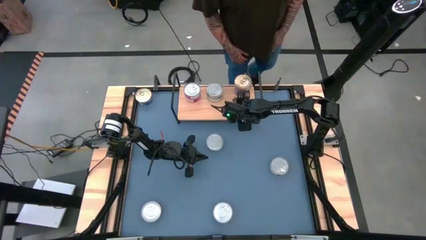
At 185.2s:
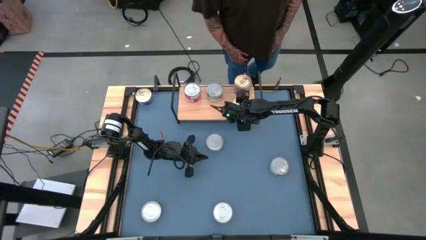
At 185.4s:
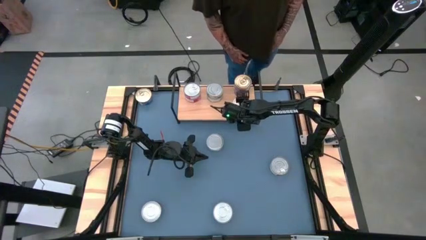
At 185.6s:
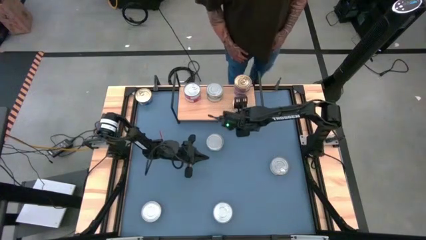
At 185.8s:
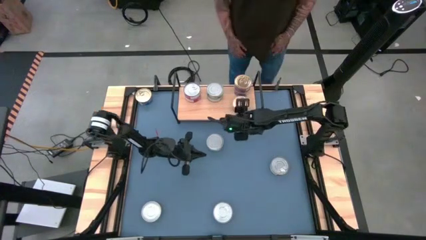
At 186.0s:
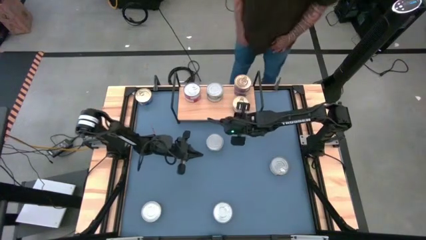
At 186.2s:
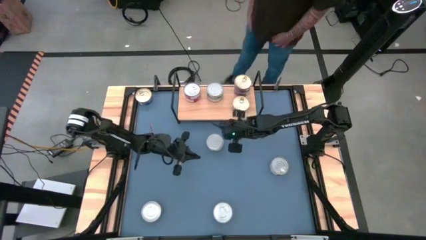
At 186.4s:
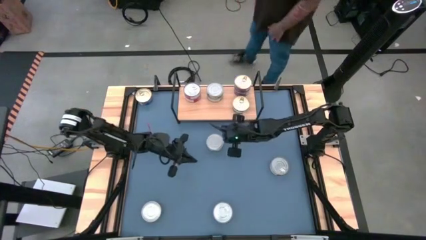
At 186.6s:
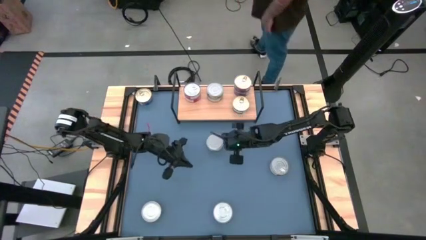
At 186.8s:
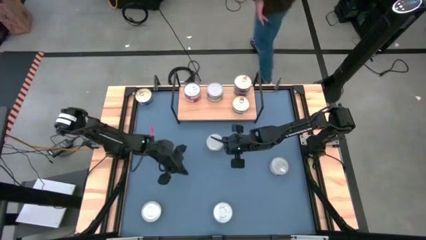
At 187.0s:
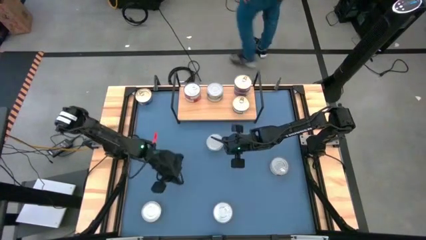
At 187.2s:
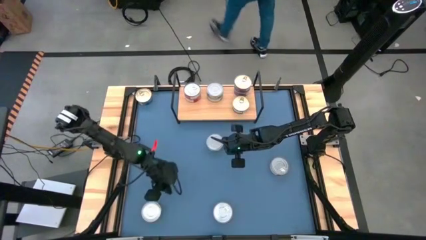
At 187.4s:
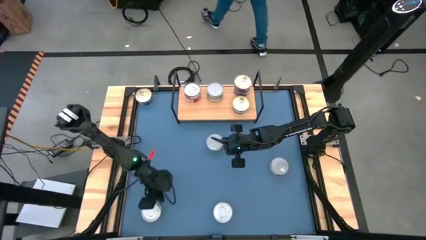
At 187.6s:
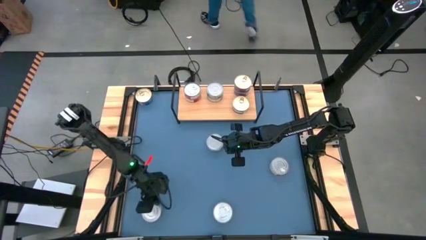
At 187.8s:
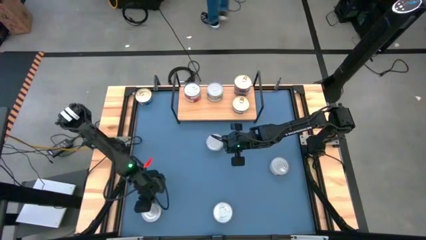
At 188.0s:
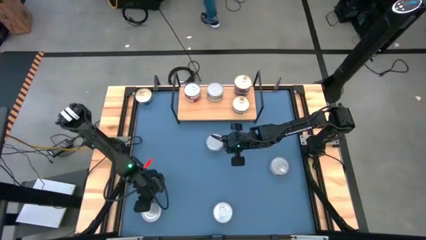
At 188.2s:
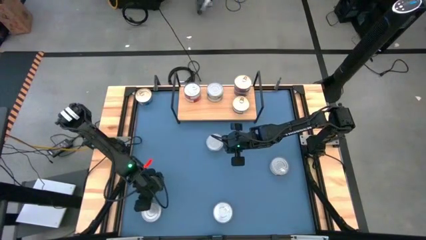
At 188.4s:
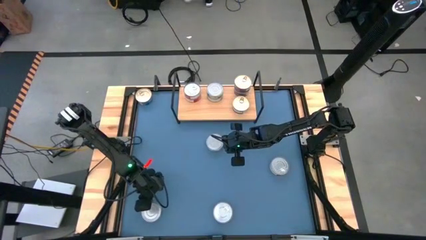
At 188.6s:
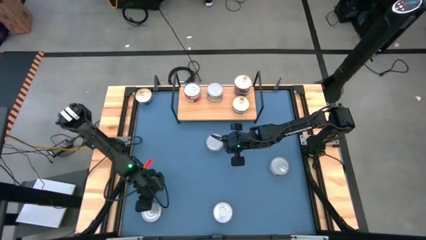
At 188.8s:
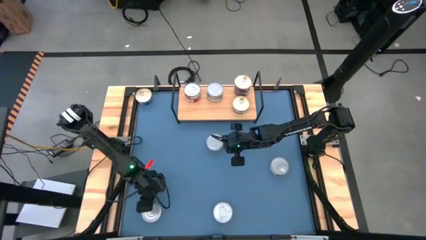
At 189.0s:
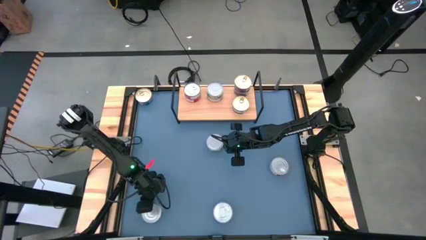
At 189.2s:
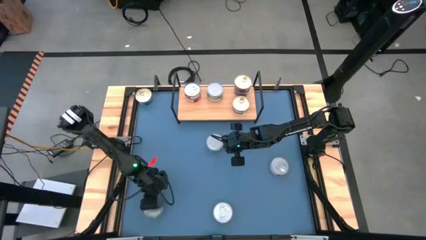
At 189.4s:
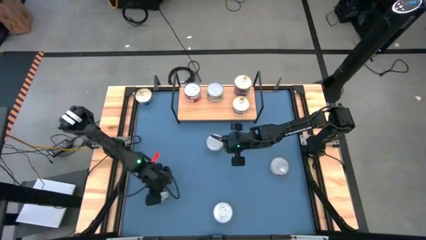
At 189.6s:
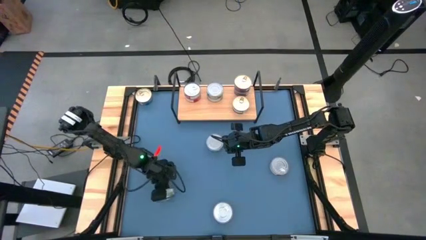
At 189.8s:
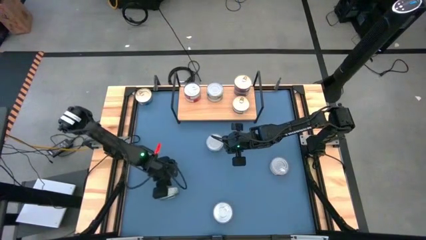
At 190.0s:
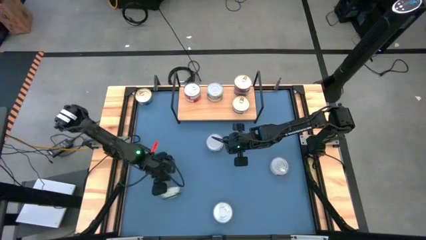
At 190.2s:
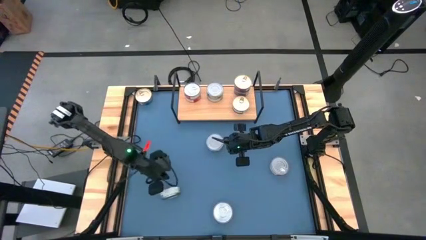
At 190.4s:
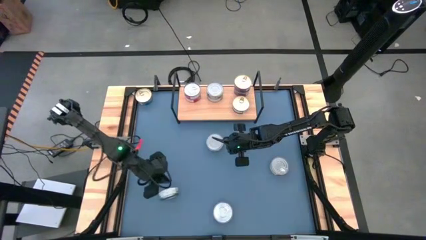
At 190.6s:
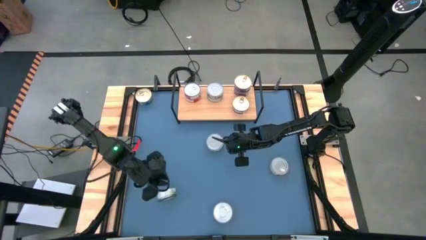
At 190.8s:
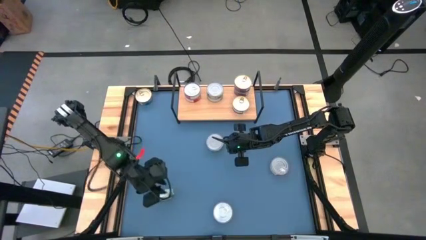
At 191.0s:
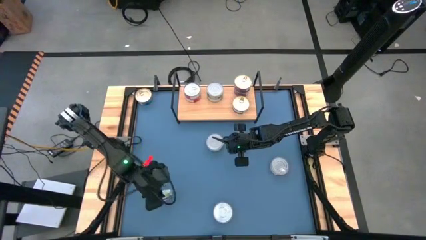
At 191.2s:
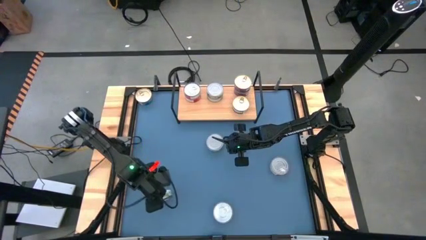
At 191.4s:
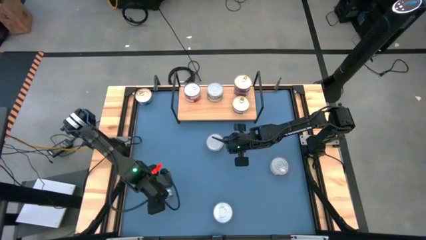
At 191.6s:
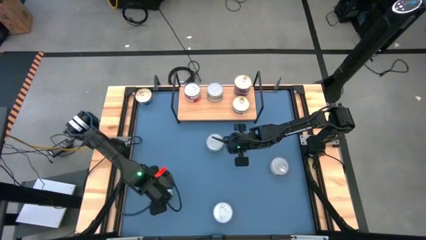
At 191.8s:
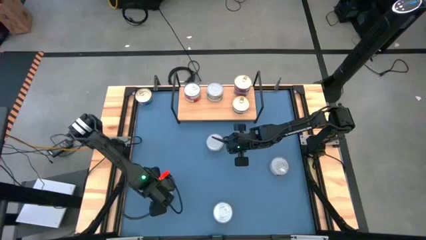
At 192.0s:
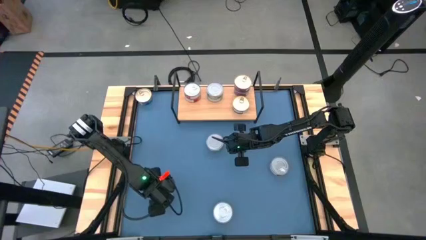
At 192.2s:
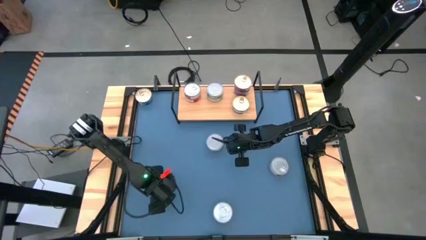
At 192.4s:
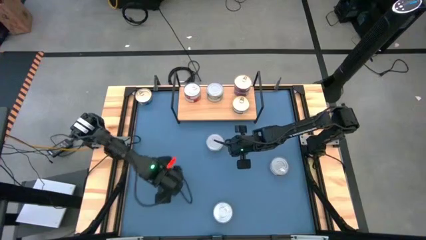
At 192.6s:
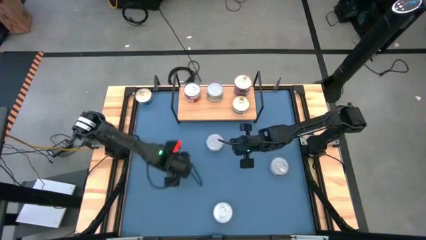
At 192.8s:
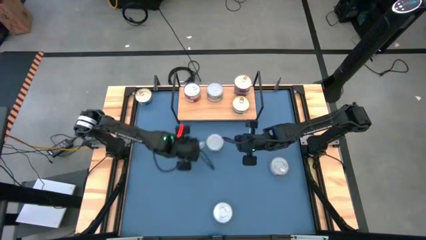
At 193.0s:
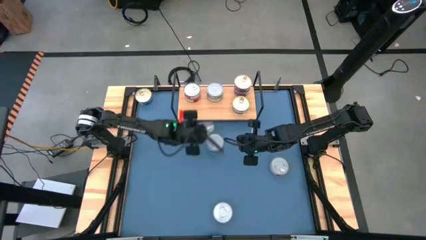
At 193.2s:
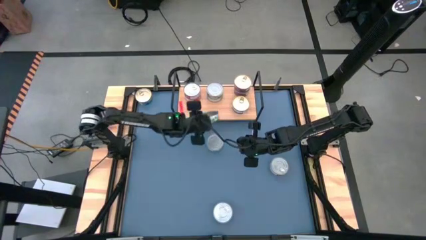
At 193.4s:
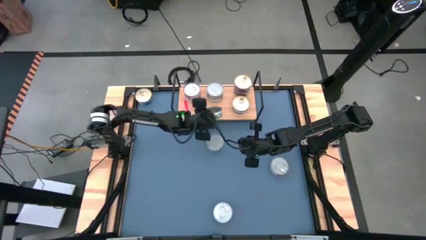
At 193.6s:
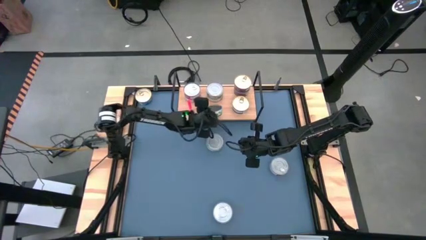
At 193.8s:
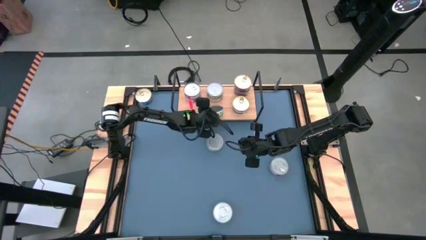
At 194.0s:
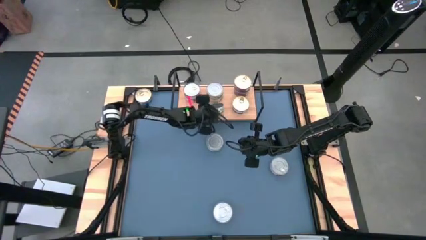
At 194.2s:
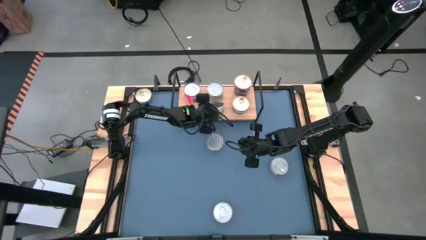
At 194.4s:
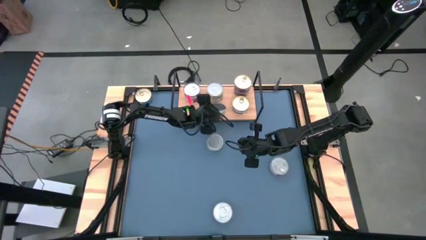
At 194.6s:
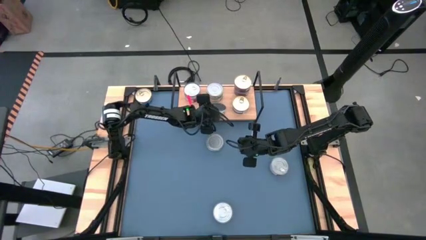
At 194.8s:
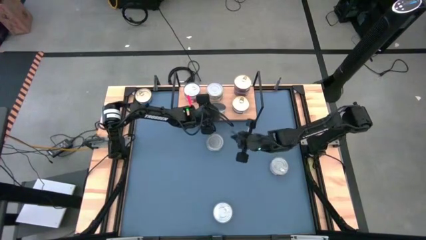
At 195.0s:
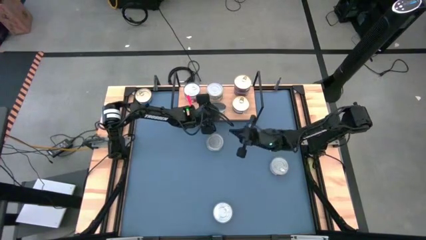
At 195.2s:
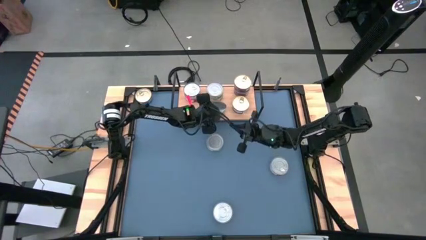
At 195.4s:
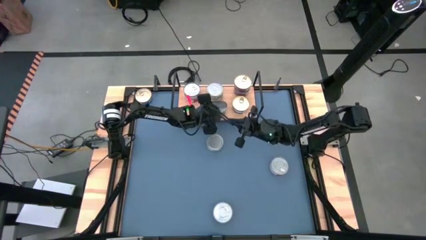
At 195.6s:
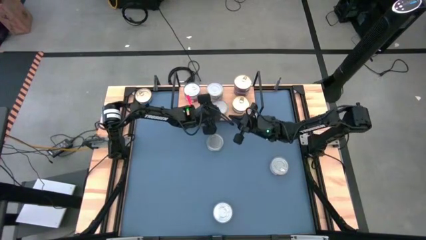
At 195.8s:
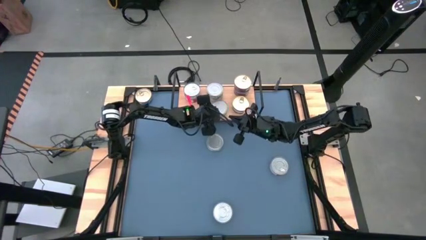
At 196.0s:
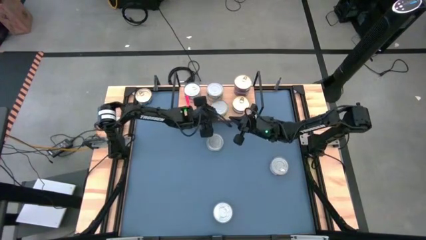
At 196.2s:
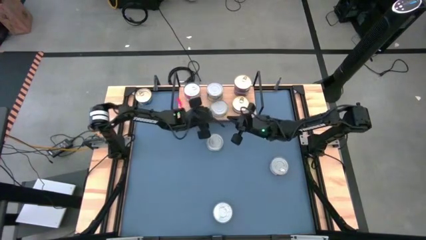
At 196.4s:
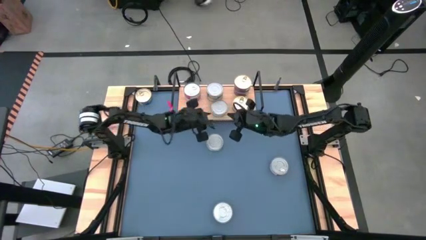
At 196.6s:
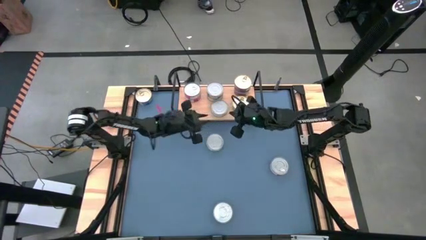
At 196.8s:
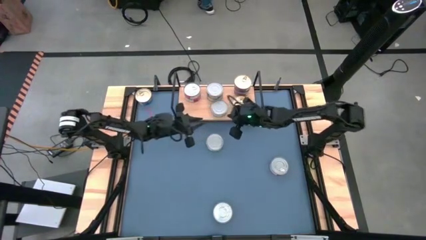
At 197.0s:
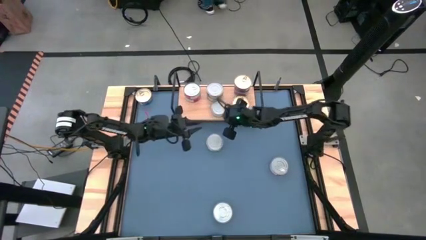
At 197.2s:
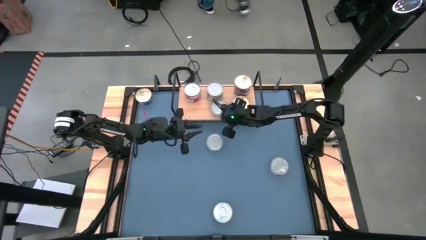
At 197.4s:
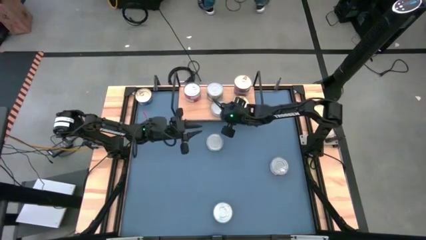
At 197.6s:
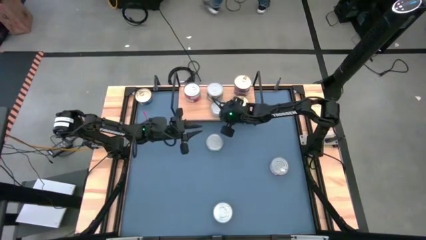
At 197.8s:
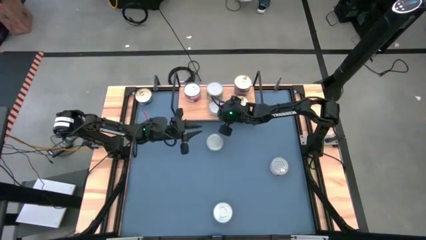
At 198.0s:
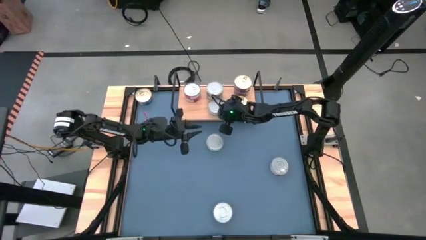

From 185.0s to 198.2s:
Task: Stack canned seafood by type on shelf
Put the green tuna can on the shelf aligned with the stacked green tuna cans

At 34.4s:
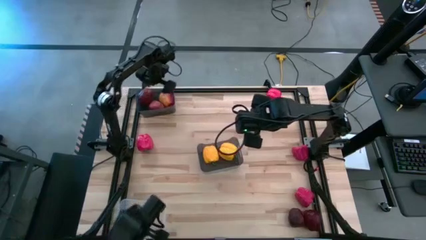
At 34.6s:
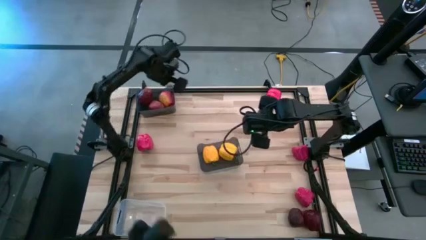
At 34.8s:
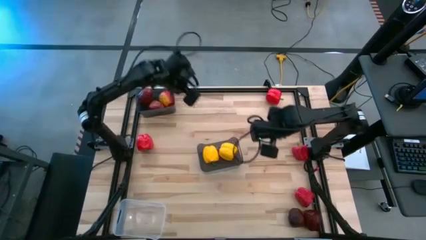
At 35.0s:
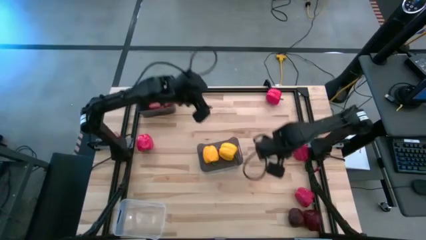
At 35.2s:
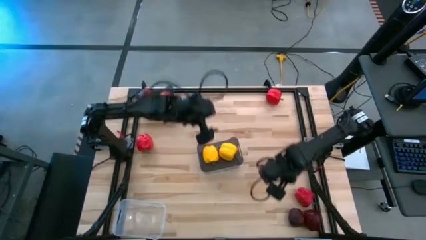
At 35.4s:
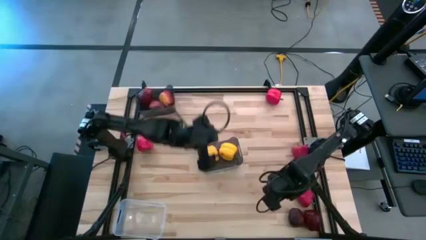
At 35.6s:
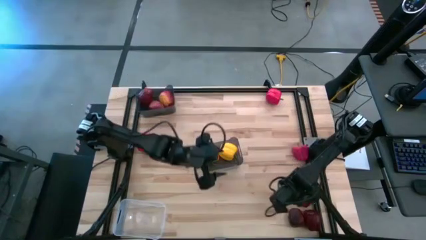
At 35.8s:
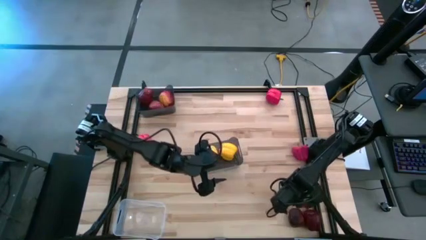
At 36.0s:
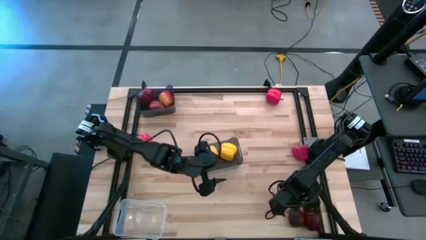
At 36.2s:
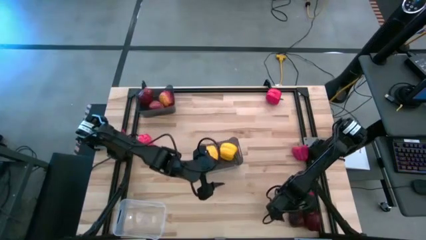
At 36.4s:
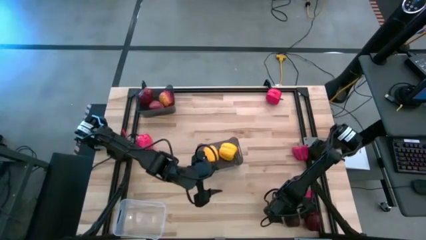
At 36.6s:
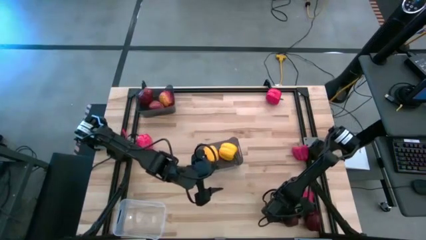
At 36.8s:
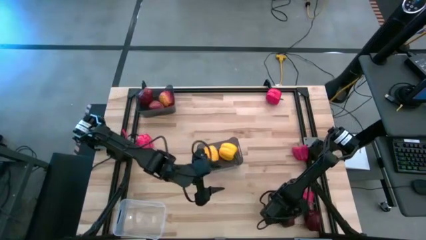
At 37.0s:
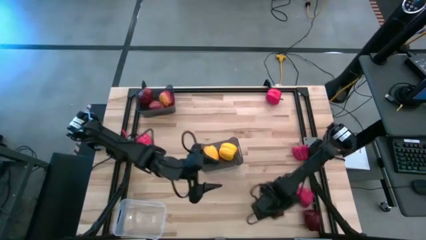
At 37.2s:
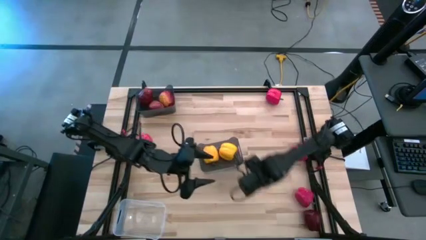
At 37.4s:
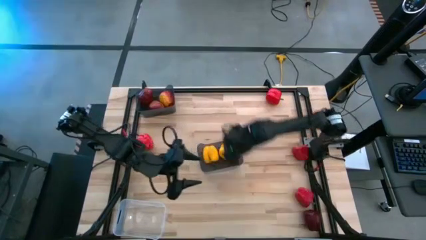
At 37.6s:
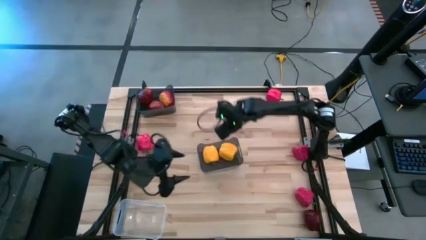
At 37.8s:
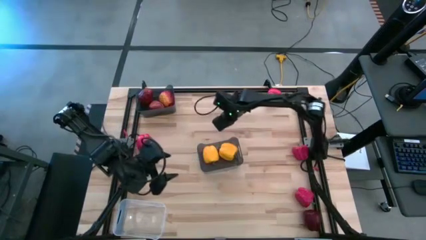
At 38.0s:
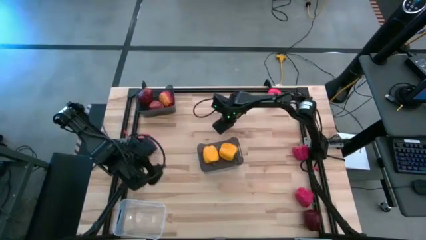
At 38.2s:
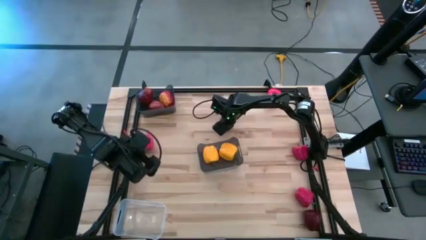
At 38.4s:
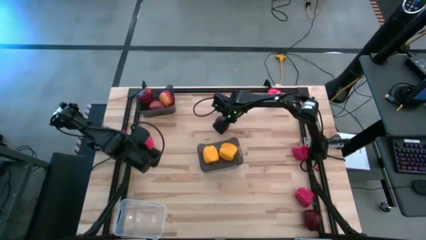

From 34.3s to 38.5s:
Task: Sort produce into baskets
Move the left apple to the top middle of the table
